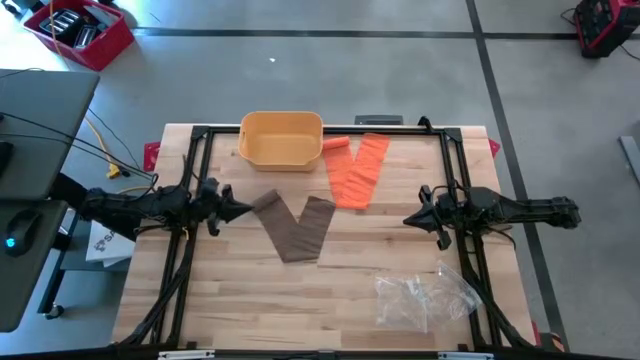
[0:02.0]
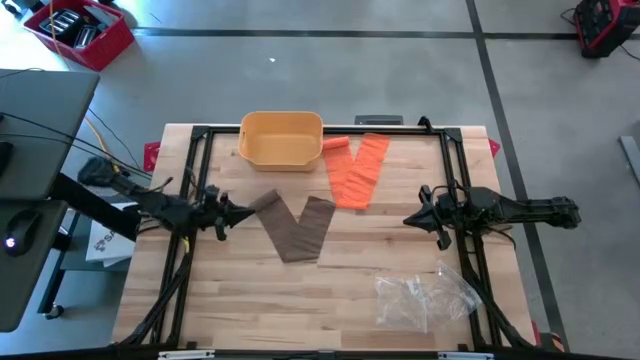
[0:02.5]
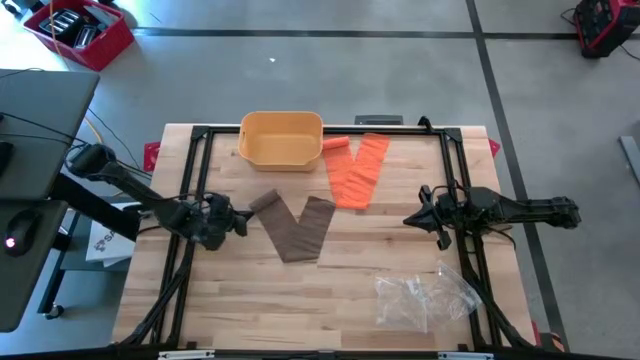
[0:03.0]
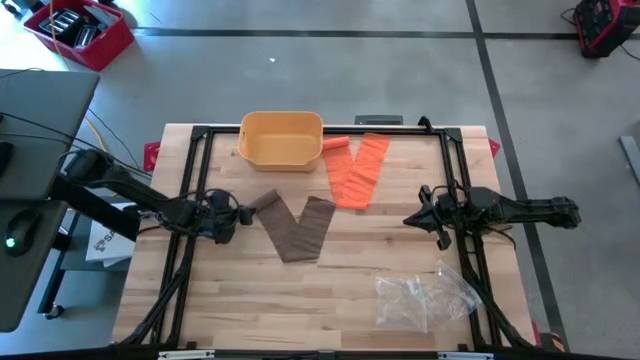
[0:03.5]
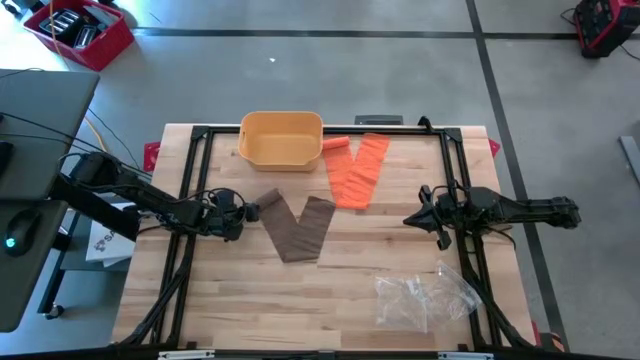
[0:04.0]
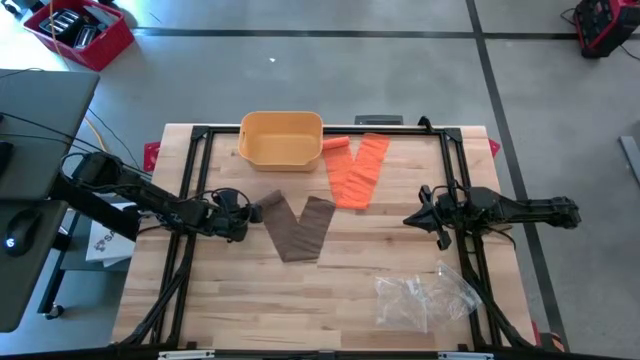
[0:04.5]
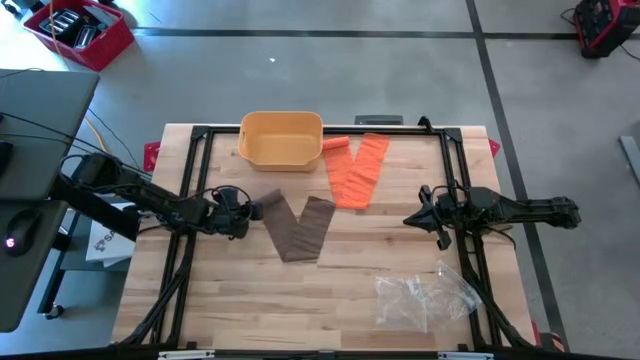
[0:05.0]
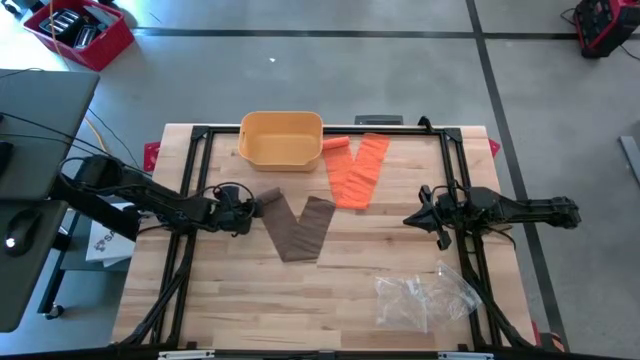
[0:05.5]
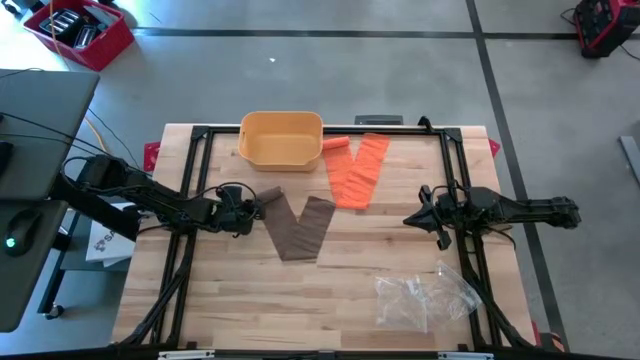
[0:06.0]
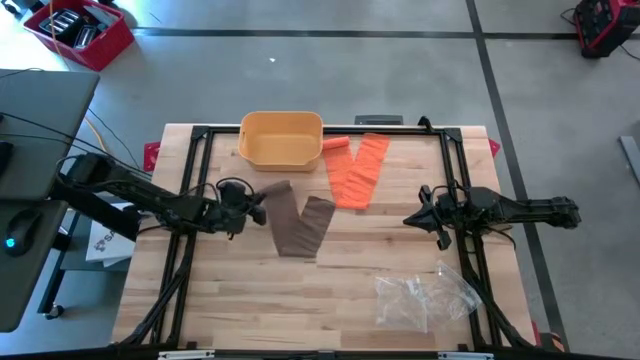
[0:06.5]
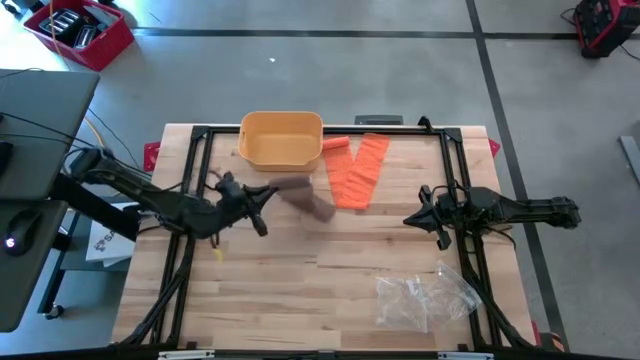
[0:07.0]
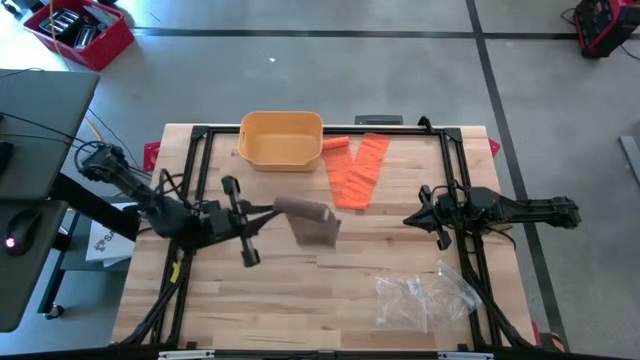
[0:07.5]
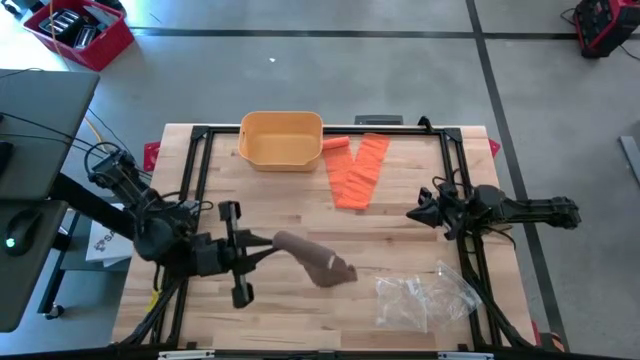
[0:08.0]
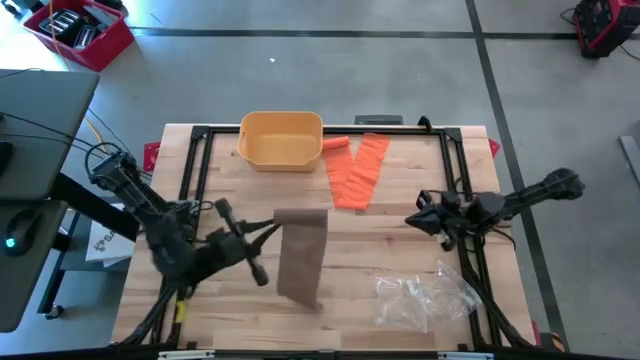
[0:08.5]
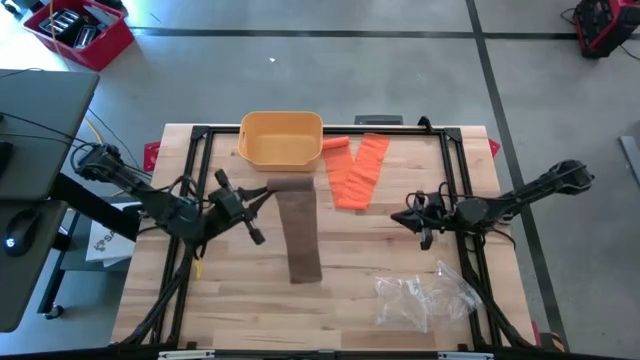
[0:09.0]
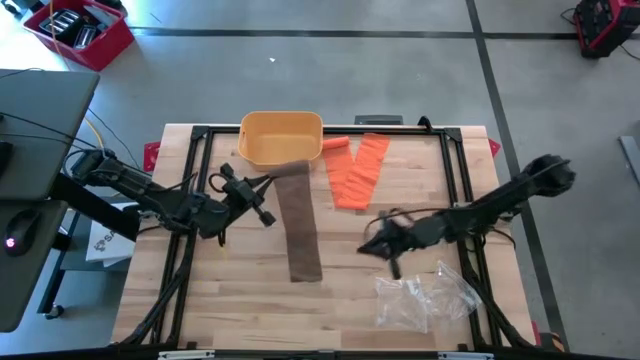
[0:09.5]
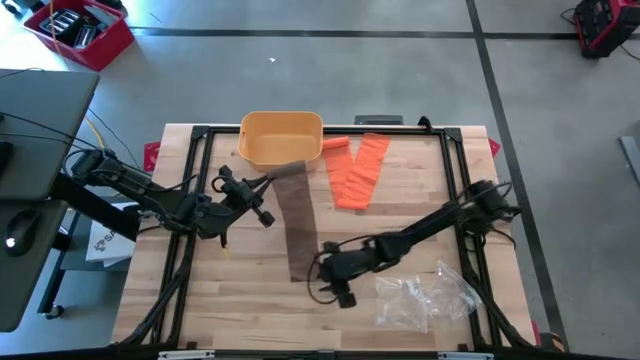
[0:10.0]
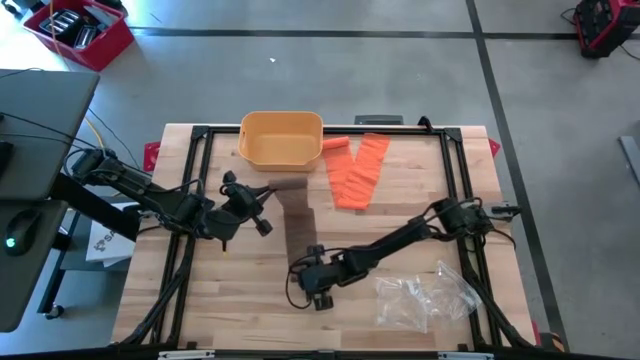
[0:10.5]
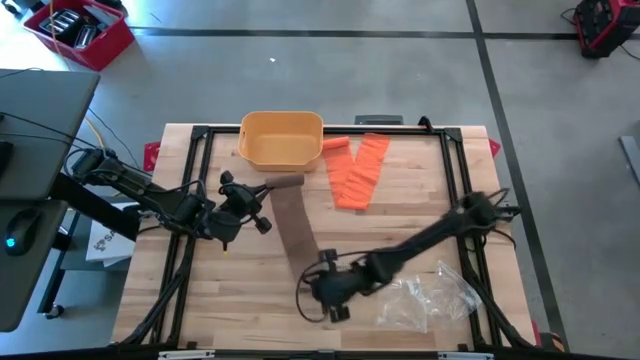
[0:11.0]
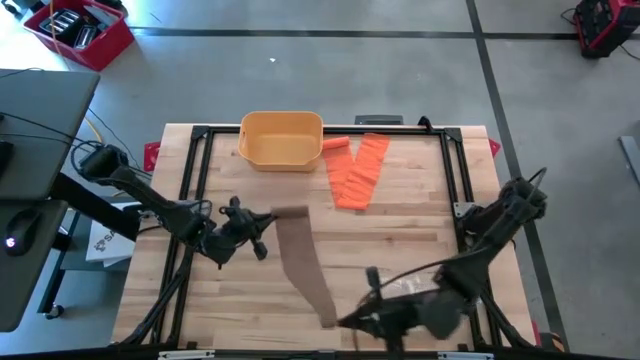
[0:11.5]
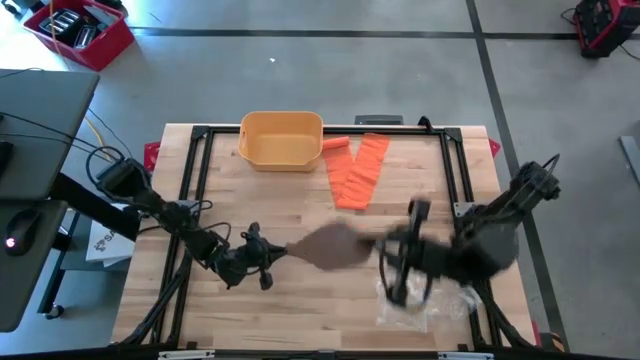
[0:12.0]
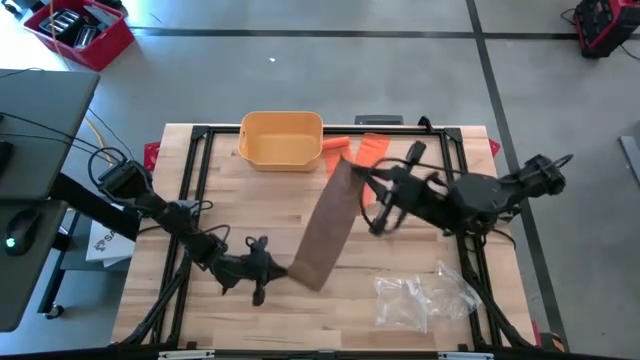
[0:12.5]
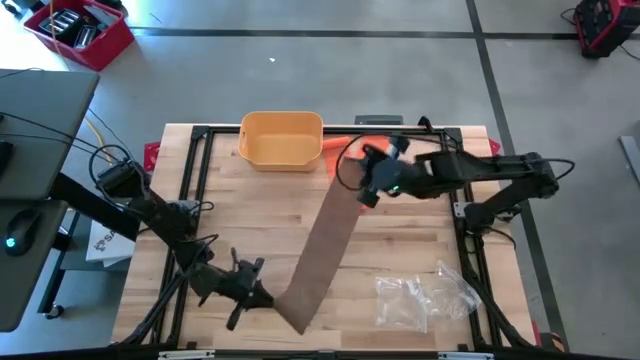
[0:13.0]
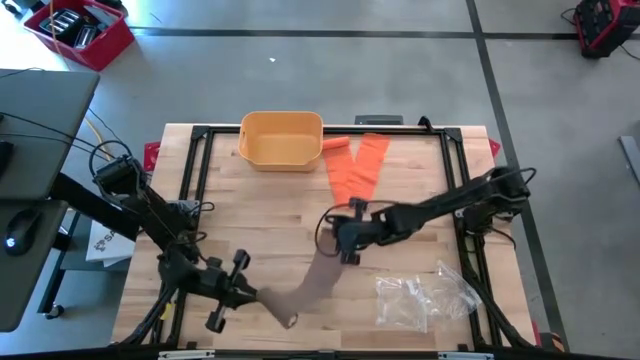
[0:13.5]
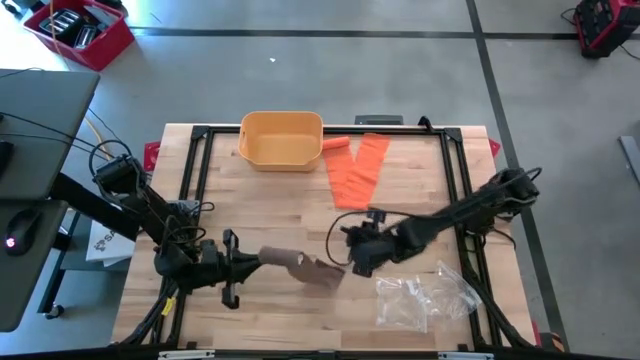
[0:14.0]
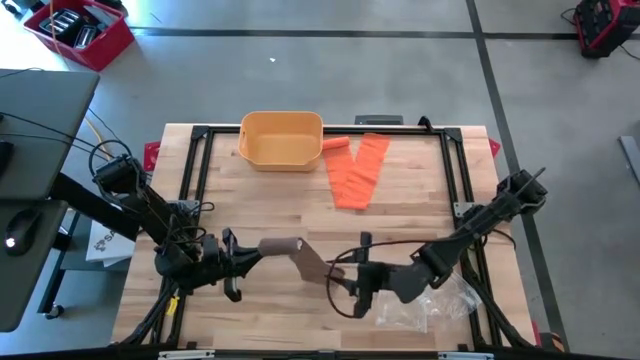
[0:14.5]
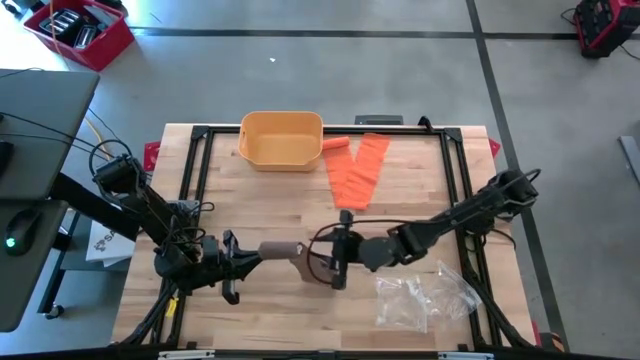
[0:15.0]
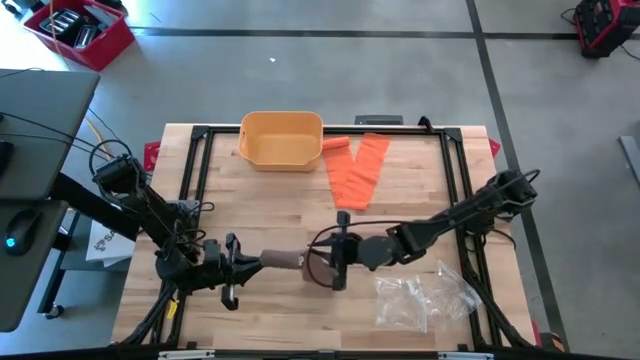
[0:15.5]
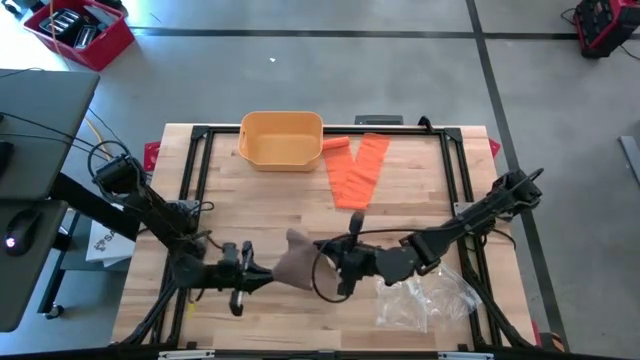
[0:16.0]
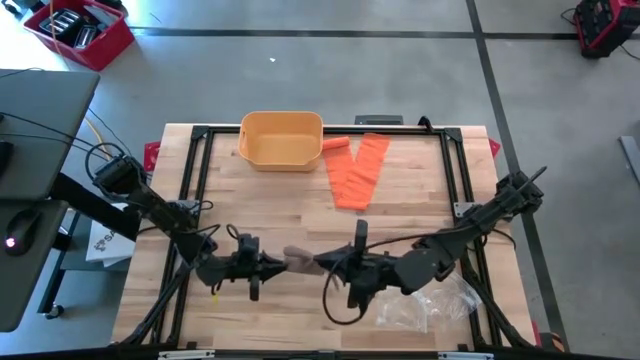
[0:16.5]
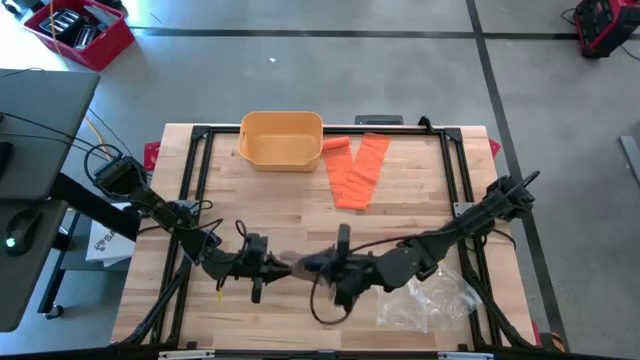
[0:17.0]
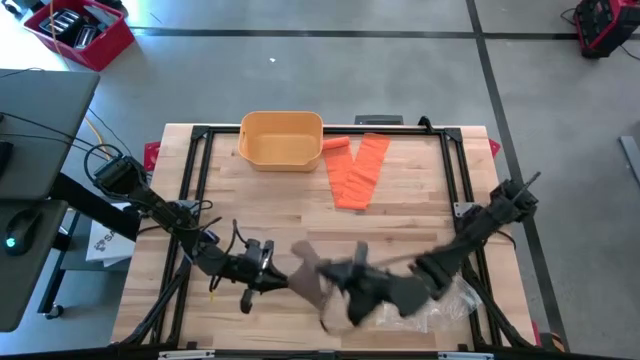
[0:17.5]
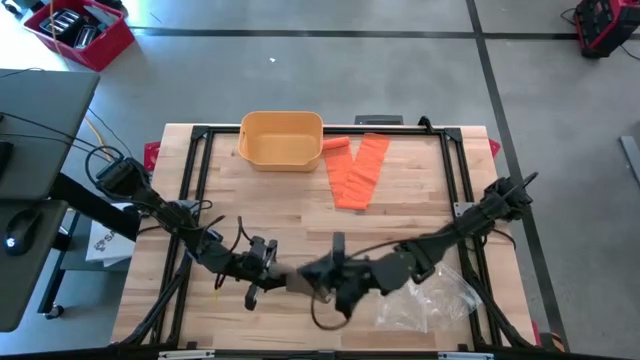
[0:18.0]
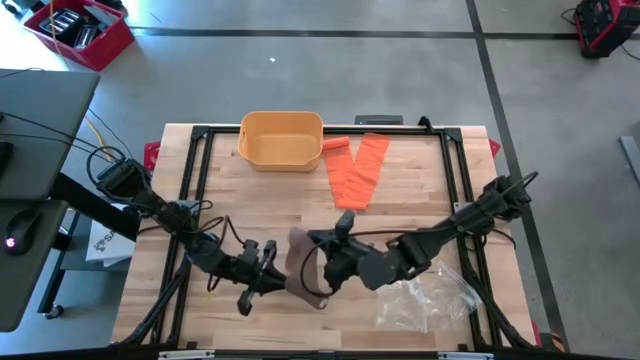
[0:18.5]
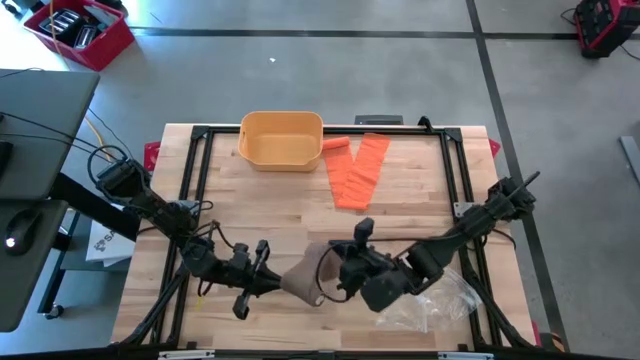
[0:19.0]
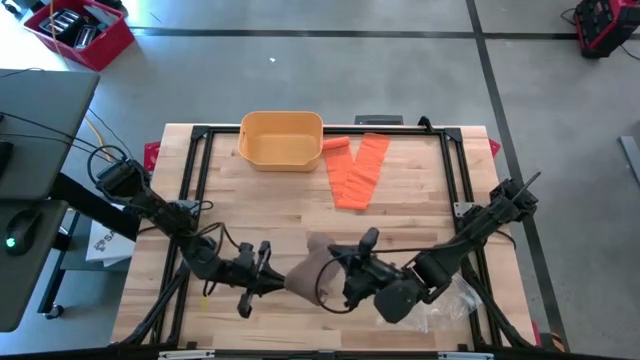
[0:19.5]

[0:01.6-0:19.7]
Task: Roll bandage
Roll the brown bandage
